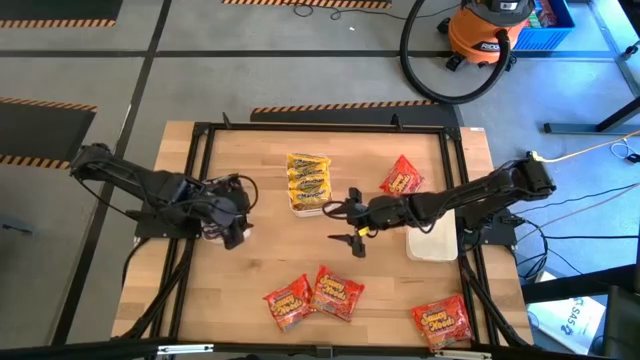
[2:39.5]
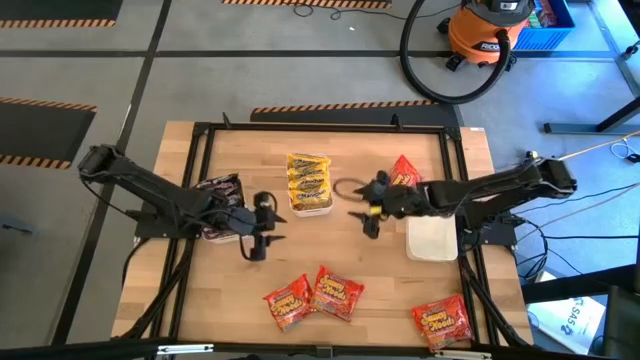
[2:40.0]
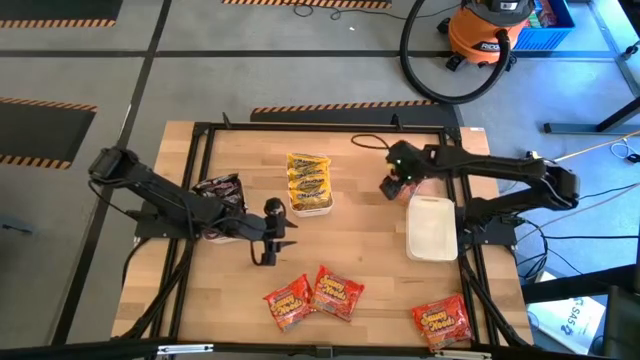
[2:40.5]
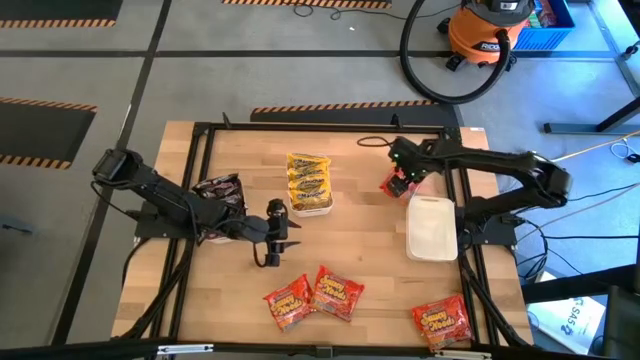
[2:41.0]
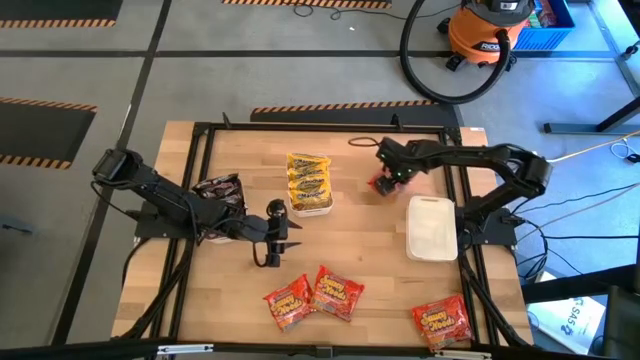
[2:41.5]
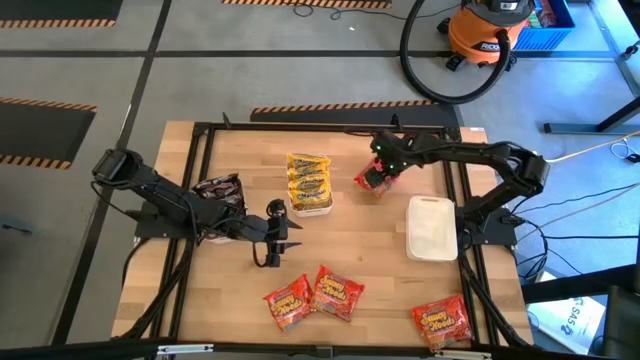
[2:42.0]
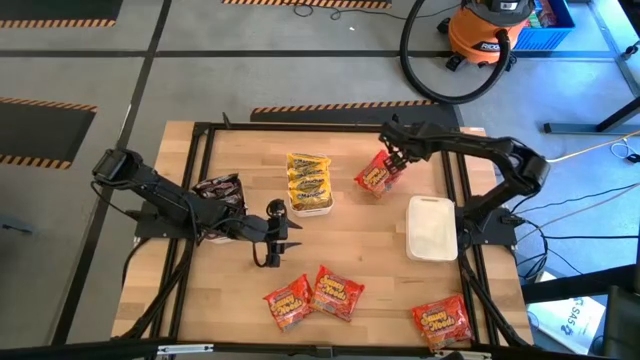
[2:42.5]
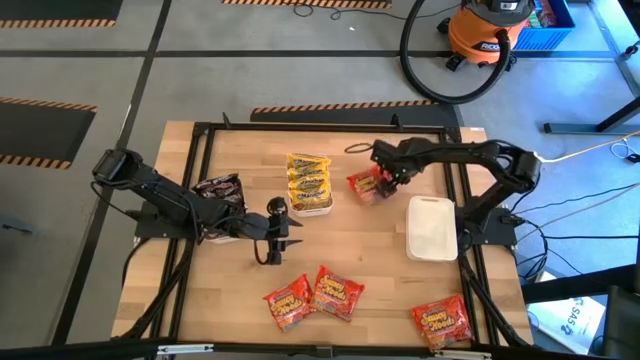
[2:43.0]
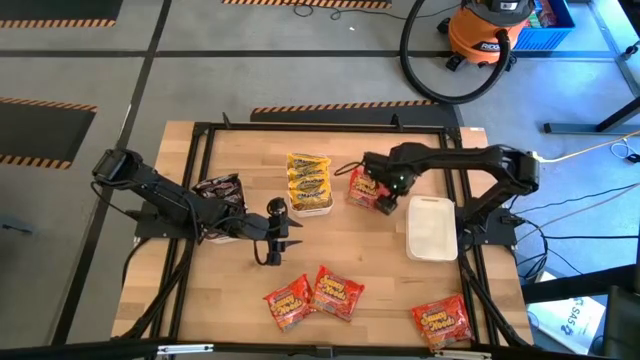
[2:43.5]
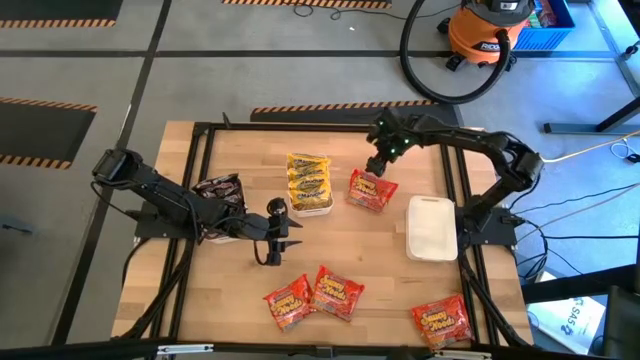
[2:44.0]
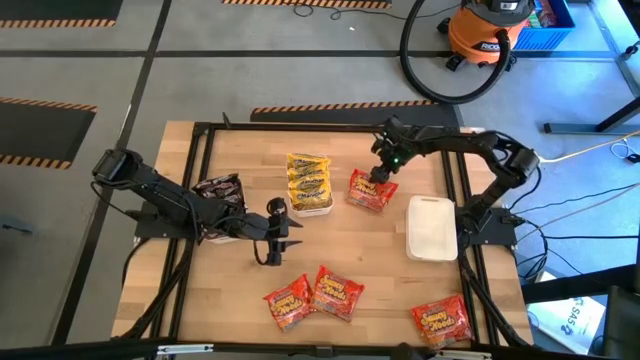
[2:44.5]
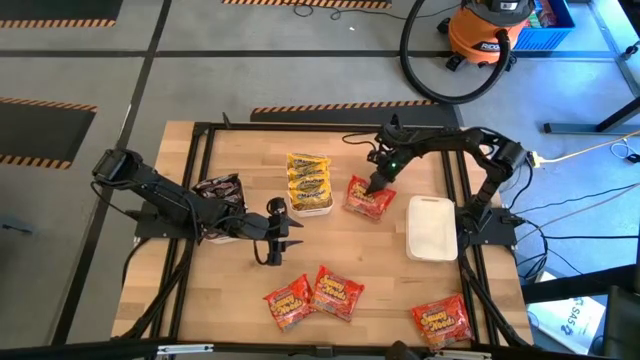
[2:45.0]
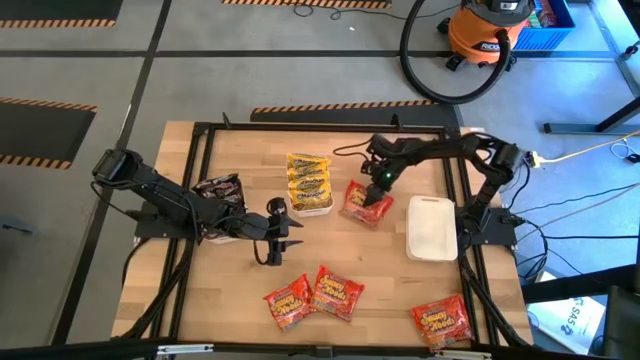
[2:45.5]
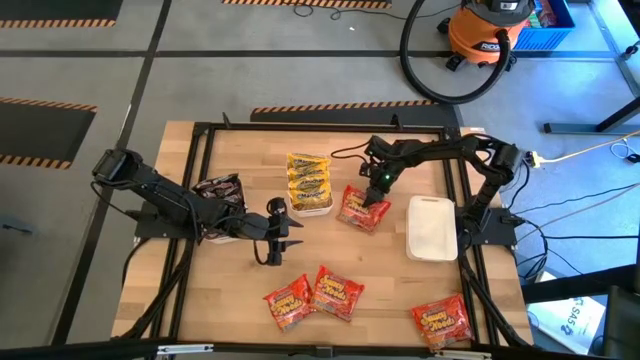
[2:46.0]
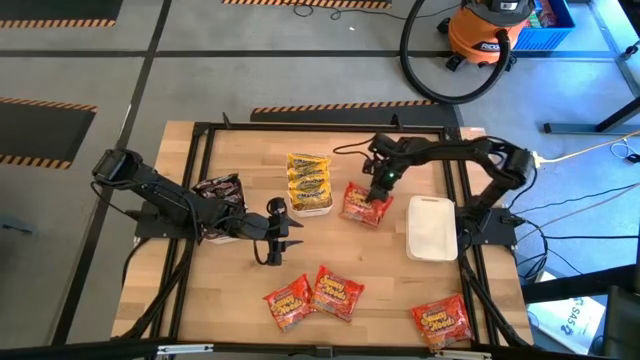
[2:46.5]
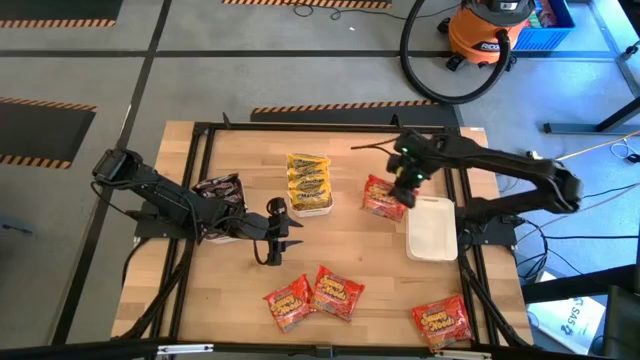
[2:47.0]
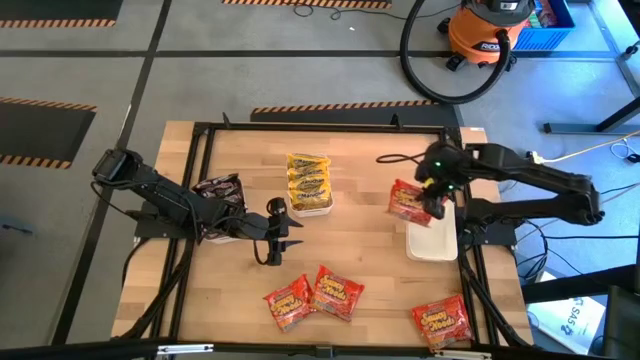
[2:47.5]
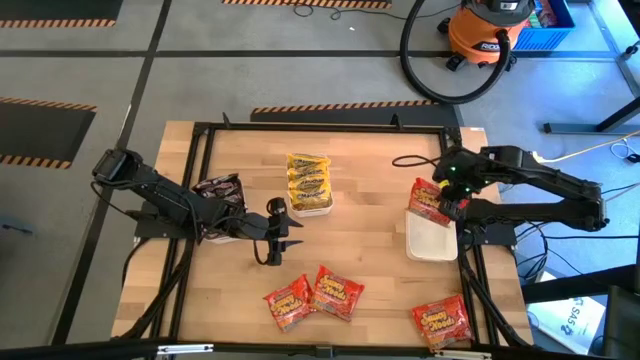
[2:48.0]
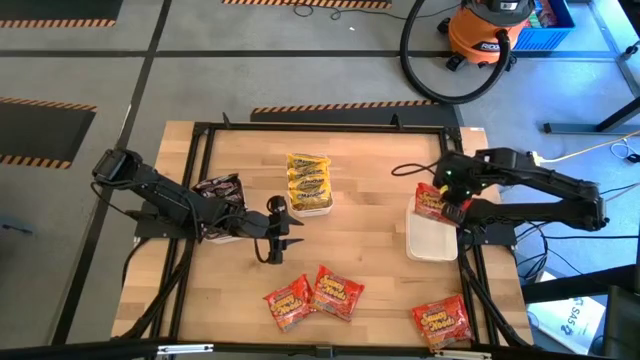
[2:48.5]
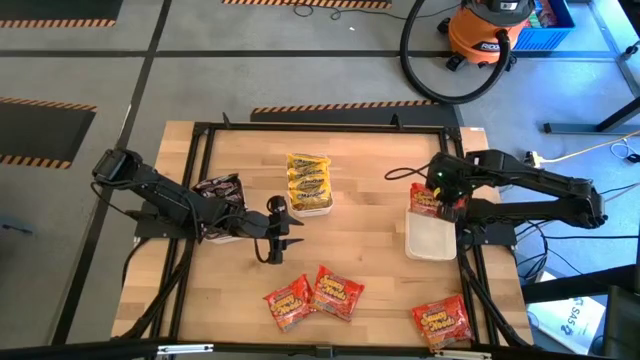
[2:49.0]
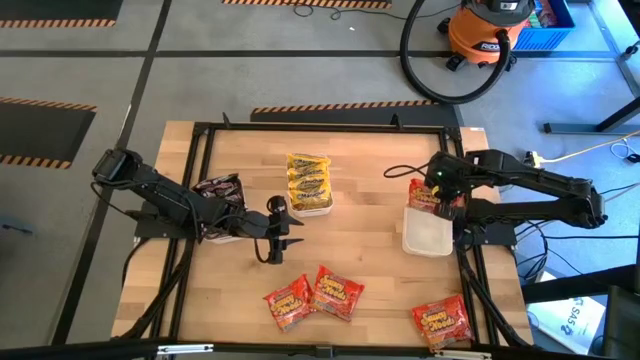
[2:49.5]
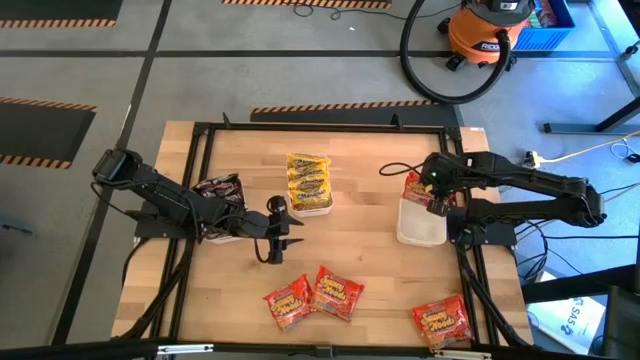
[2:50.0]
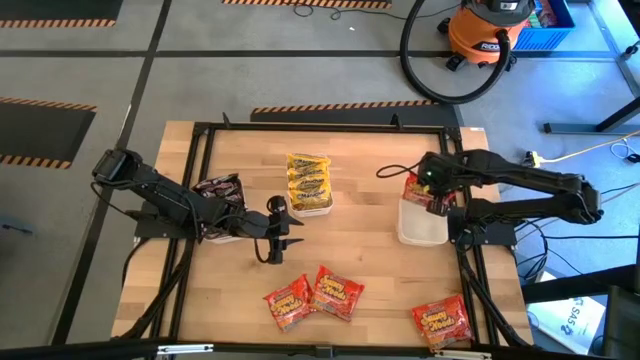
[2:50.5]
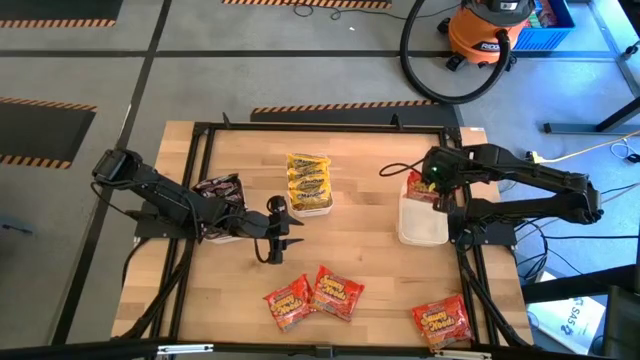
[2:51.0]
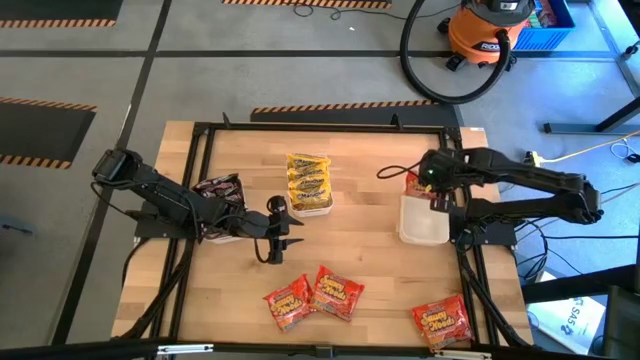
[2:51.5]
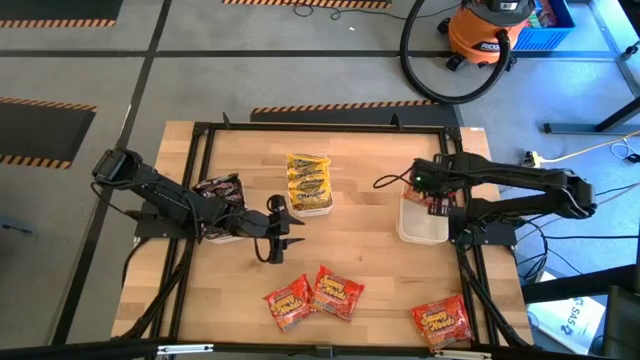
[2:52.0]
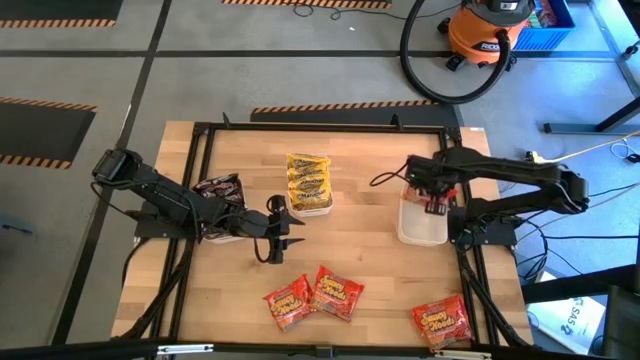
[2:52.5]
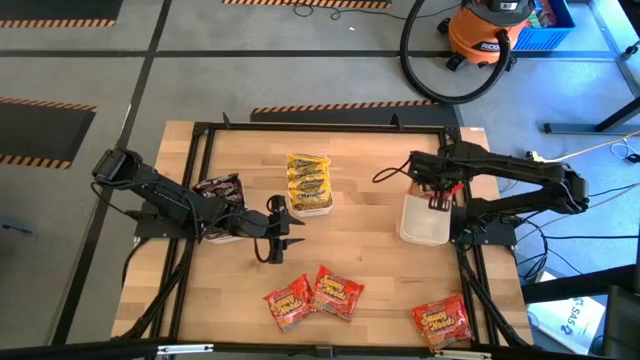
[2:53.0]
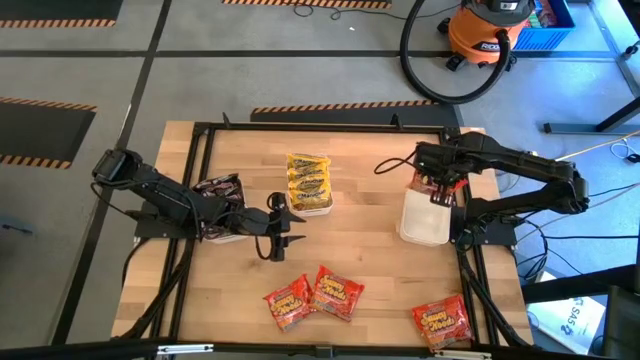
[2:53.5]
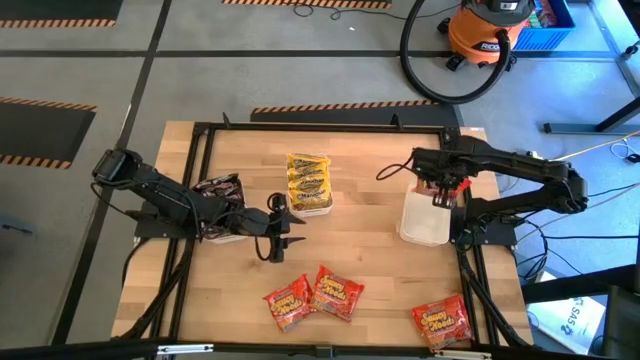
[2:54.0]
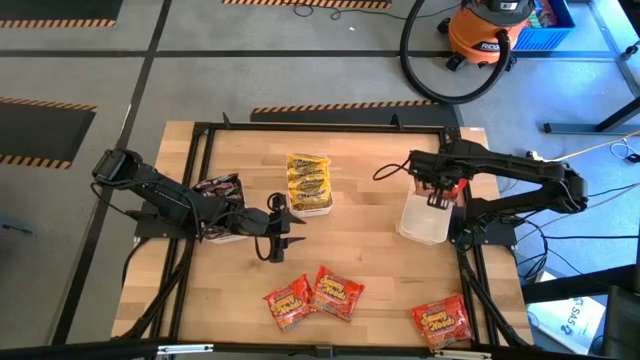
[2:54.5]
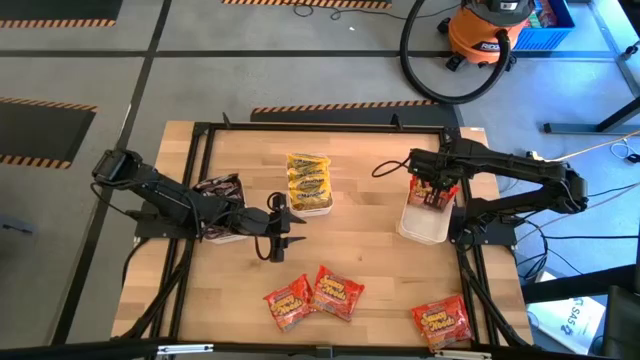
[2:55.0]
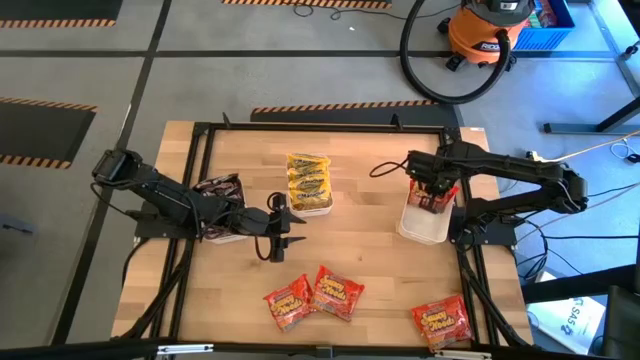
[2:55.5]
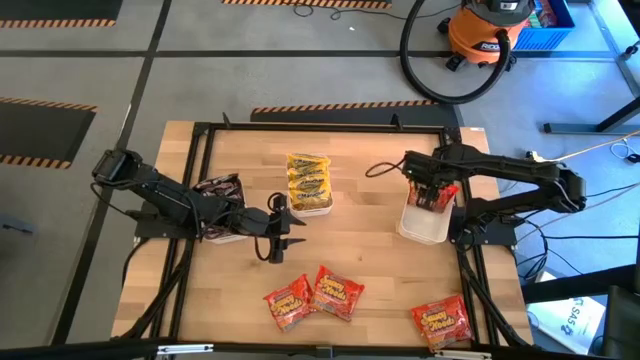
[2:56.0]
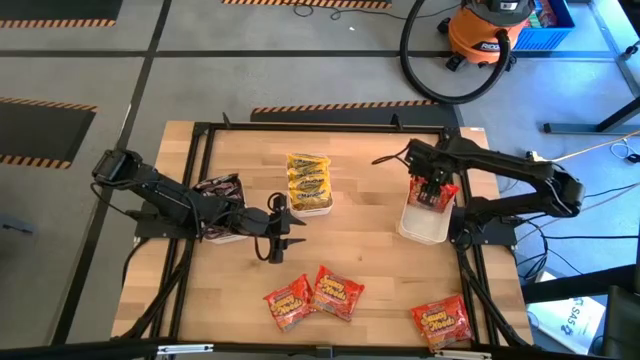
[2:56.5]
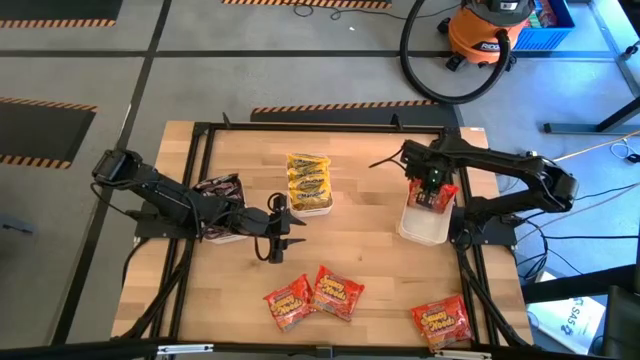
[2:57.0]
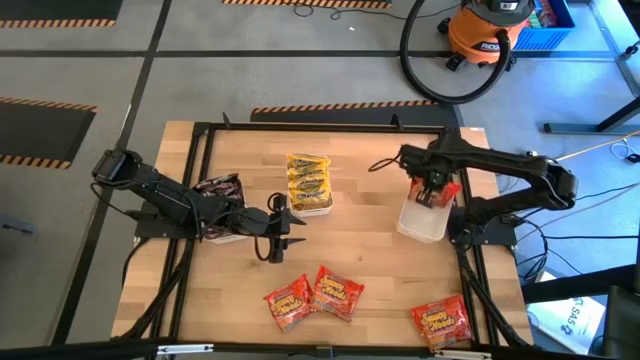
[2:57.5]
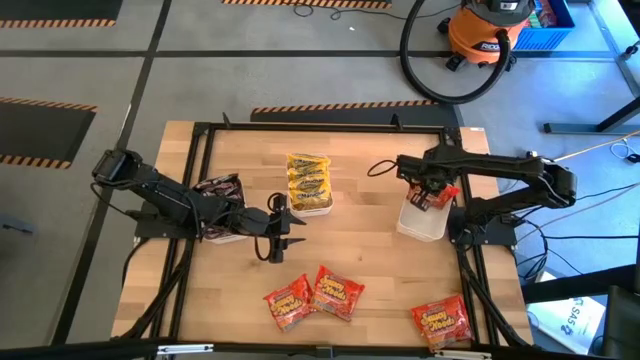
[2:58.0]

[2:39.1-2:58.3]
Task: Sort Maruchan noodles
Put the top right orange noodle pack into the right white bin

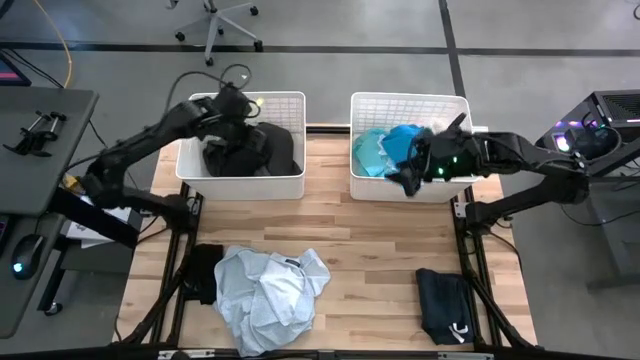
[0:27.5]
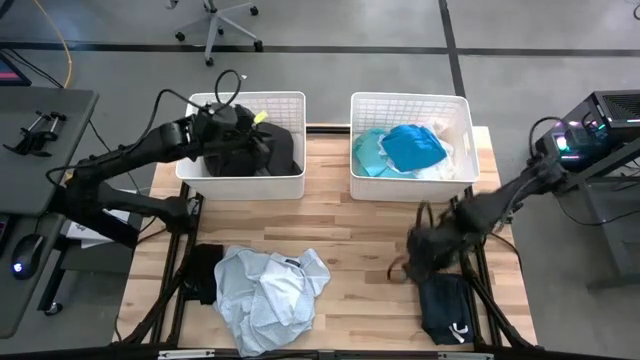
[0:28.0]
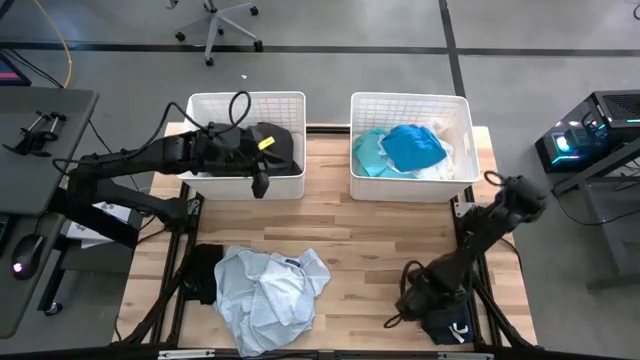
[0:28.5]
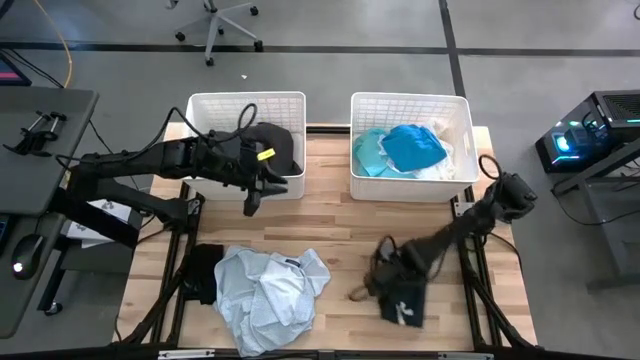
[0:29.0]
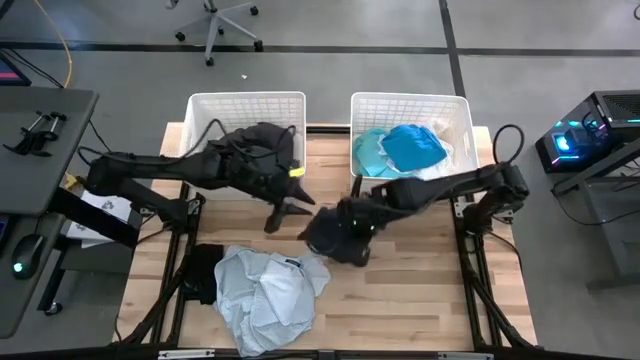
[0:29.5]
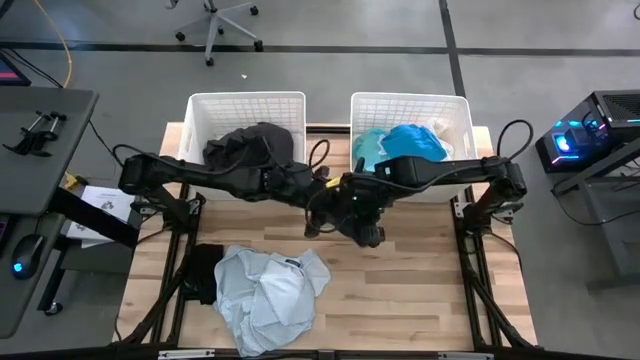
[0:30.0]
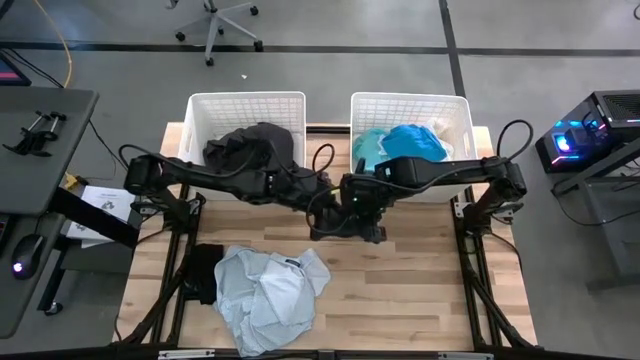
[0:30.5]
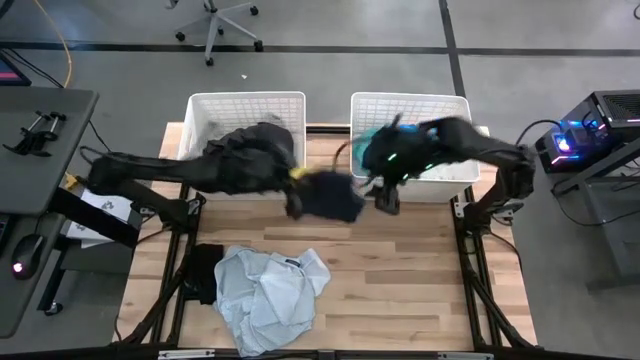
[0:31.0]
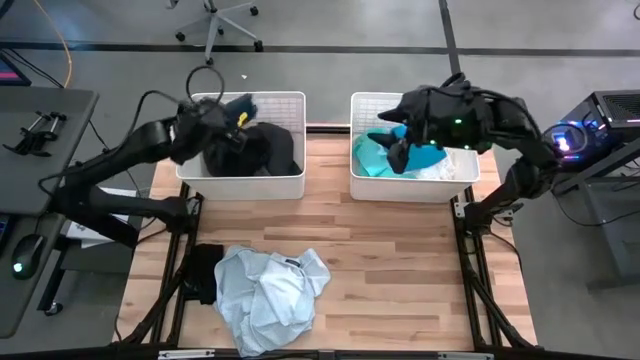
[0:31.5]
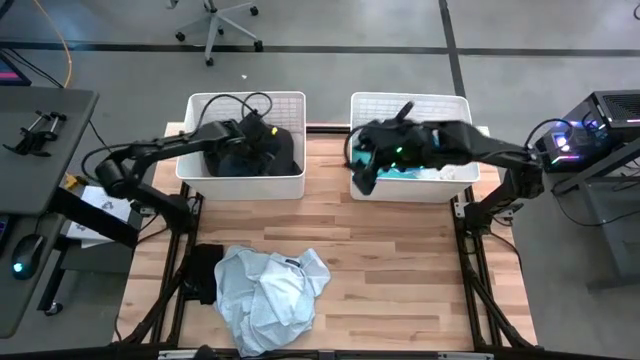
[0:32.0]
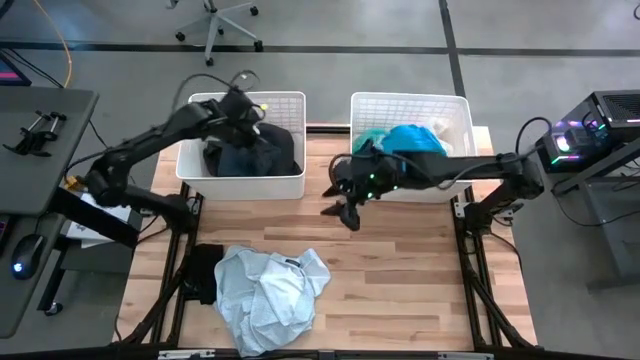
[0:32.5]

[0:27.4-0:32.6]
Task: Sort clothes
Put the blue shorts into the left white bin
